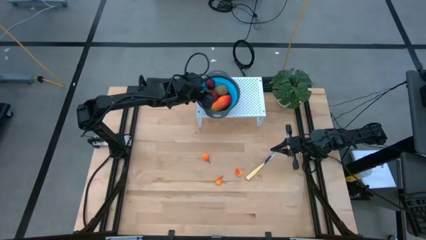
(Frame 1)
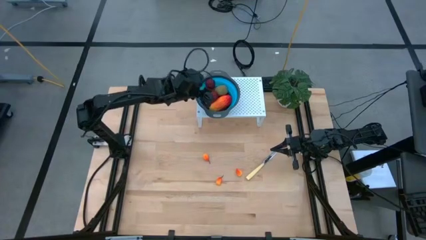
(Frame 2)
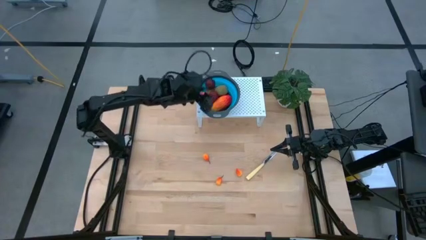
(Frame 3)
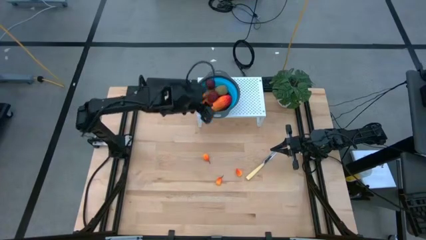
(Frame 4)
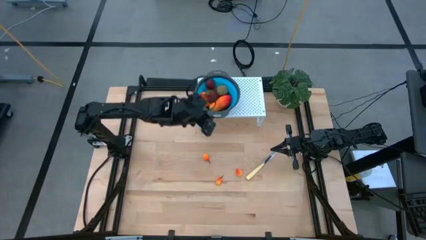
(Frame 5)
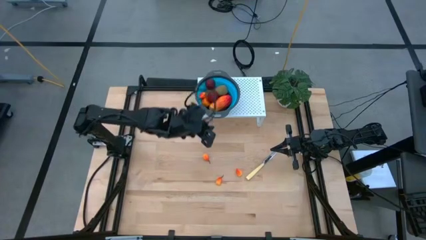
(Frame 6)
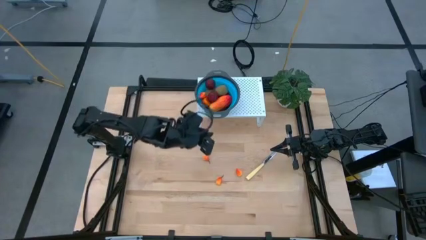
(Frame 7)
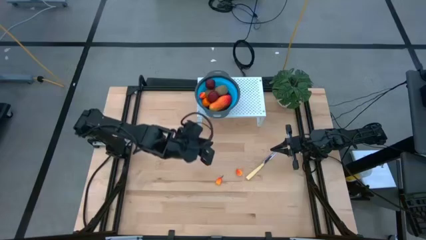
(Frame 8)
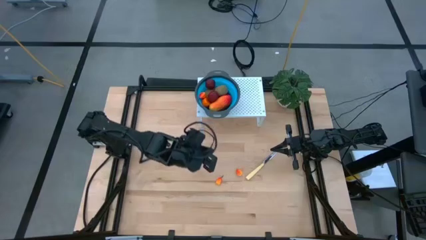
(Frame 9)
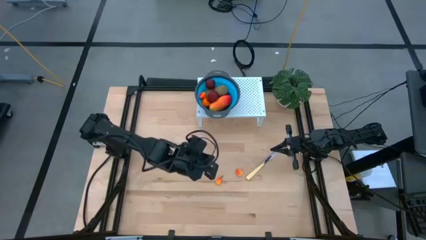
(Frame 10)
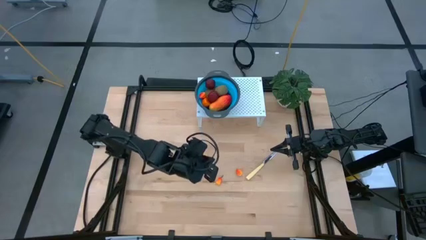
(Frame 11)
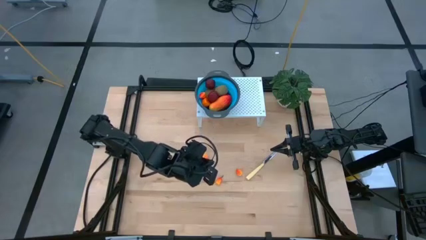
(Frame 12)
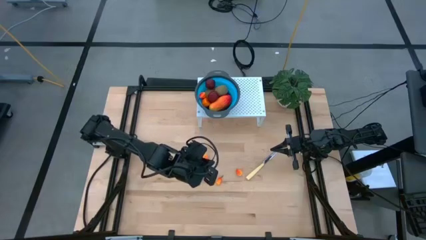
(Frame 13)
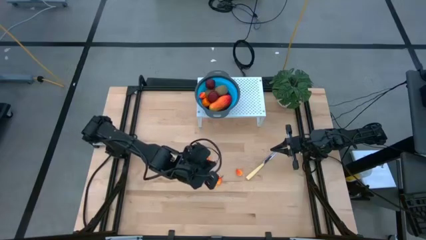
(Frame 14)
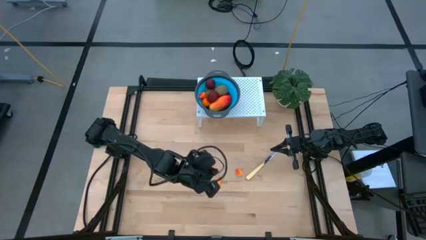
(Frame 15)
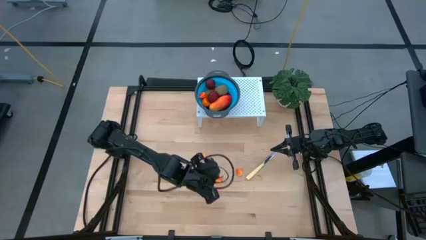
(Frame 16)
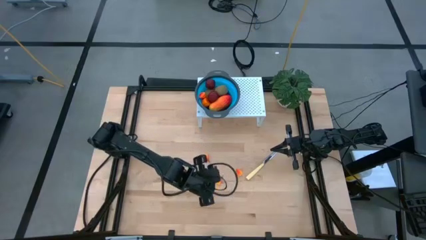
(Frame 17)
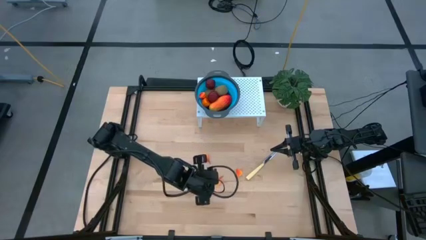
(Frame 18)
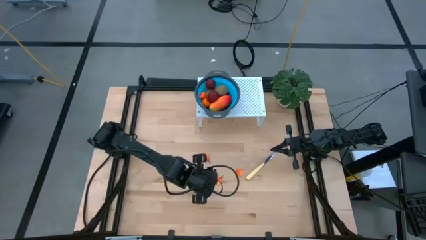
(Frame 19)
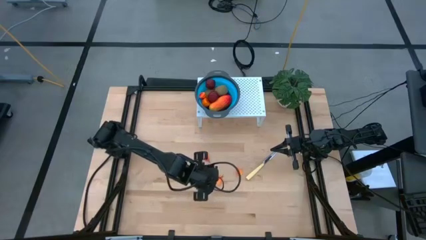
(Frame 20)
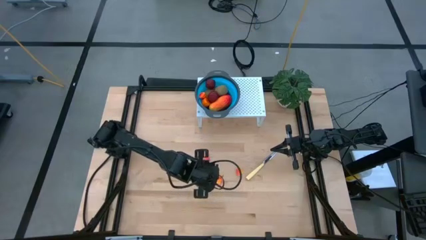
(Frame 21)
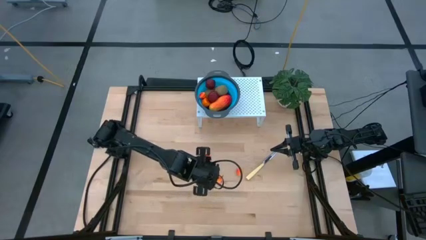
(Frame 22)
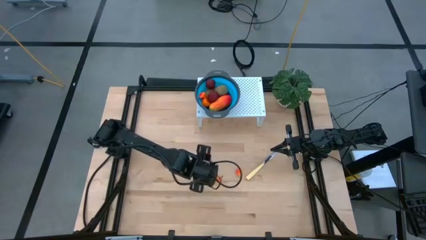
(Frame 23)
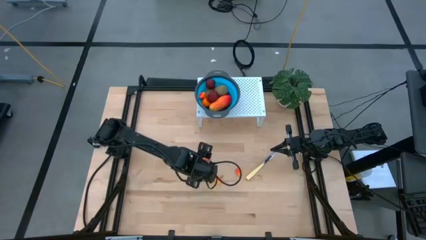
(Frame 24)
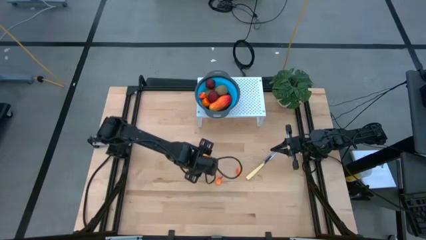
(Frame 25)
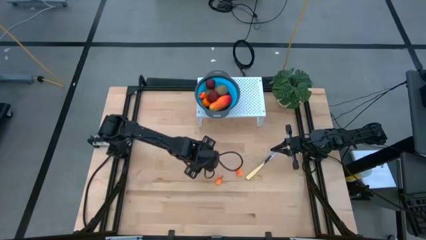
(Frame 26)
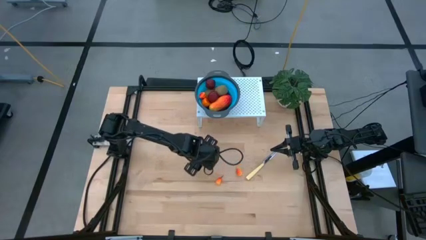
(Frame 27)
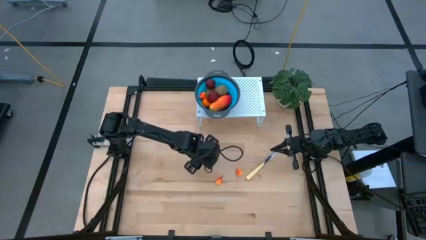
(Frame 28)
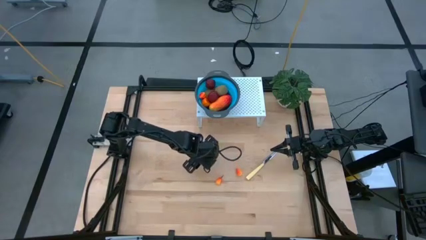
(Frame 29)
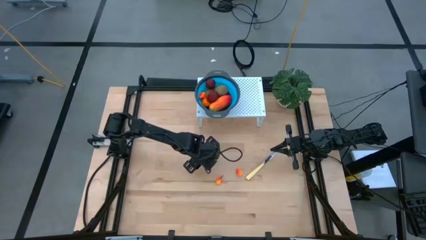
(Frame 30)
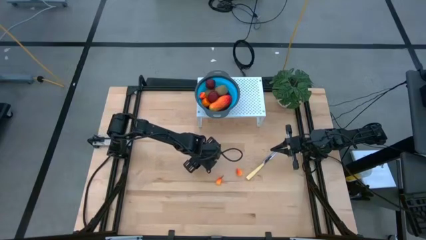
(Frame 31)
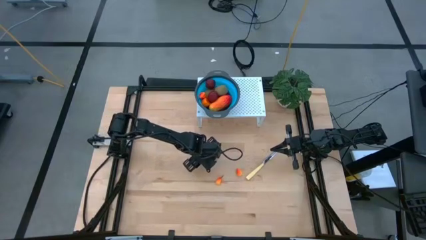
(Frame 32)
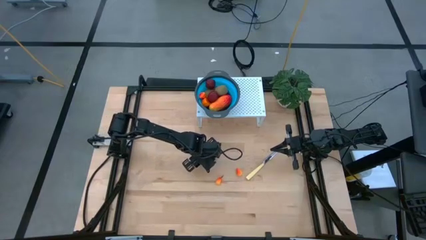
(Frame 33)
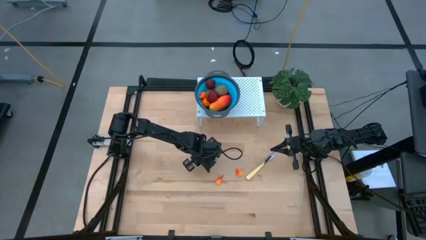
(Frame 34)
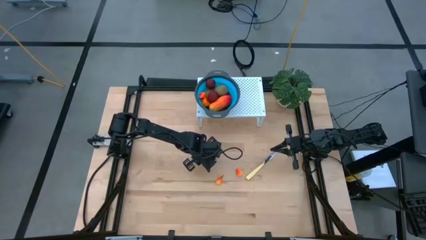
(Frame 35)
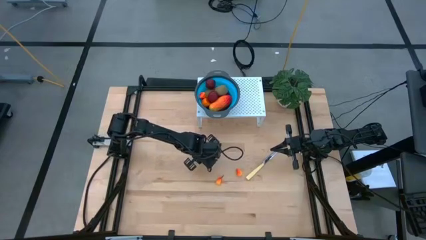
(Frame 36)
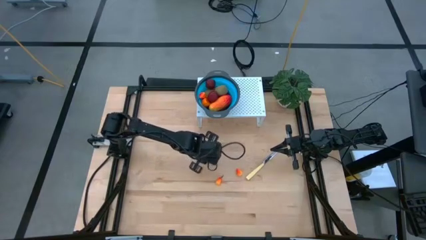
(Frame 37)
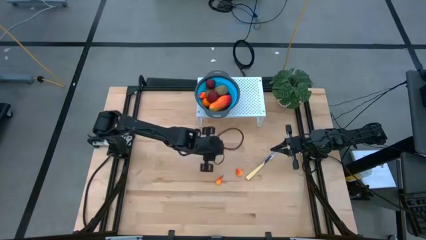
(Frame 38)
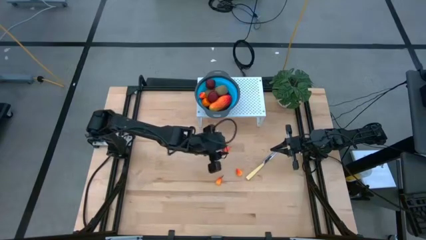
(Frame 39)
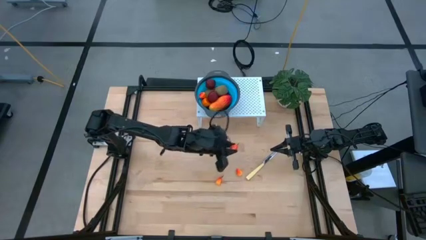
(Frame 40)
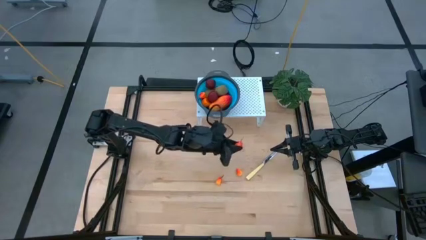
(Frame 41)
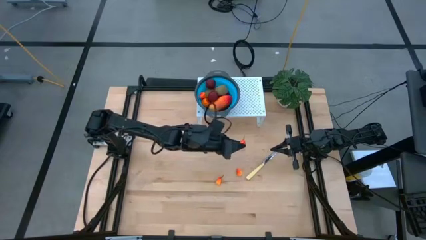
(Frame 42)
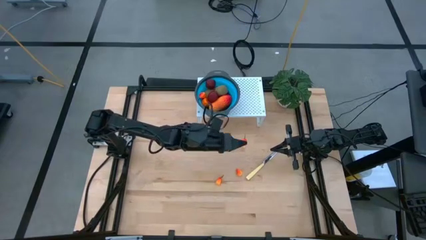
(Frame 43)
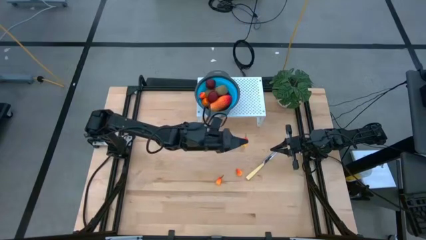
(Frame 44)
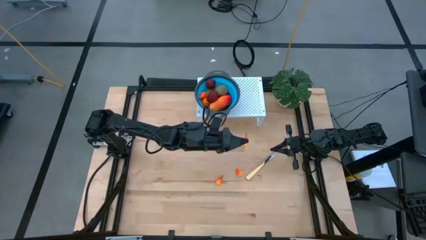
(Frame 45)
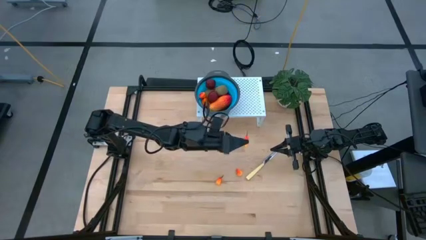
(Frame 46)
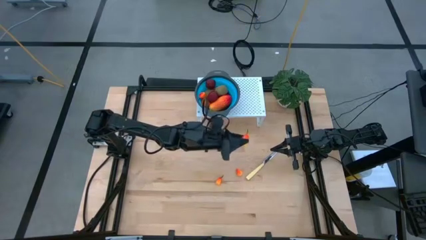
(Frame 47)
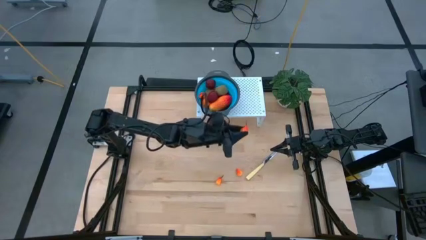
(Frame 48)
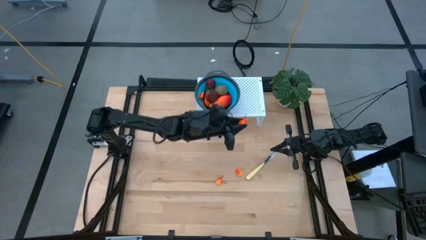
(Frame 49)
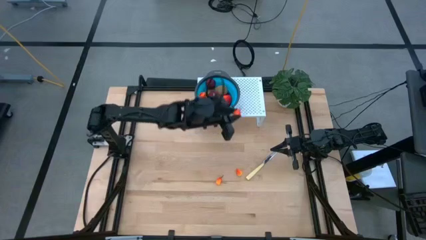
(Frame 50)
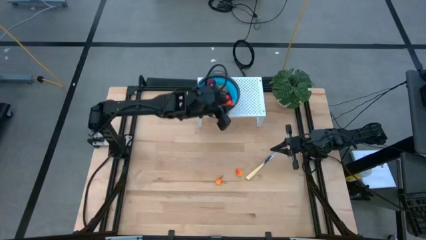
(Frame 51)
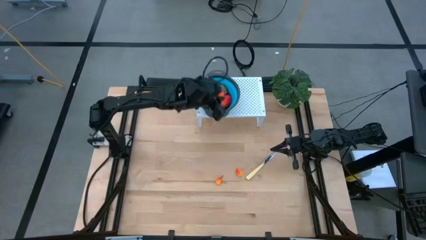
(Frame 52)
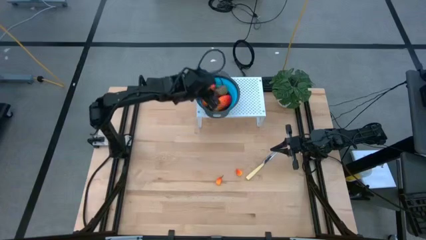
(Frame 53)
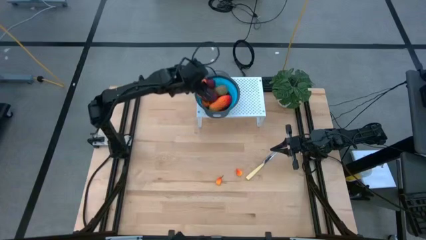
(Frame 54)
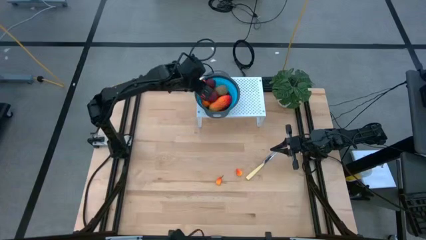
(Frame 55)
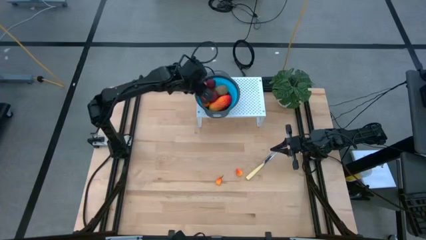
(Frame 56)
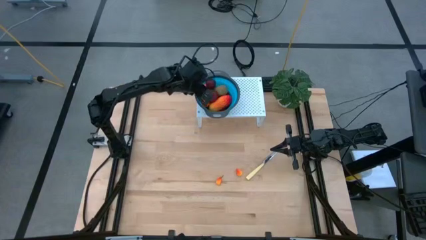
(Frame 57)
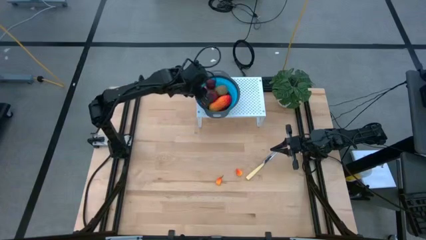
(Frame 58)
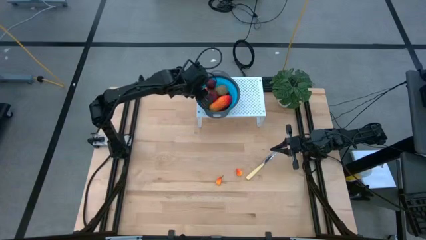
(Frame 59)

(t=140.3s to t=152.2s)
Task: Pick & Place Fruit
Put the top left pear into the blue strainer bowl on the shelf
